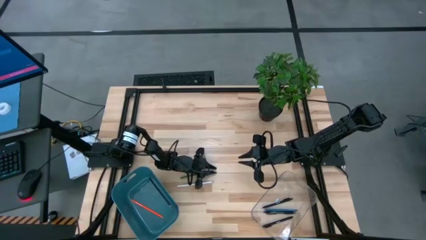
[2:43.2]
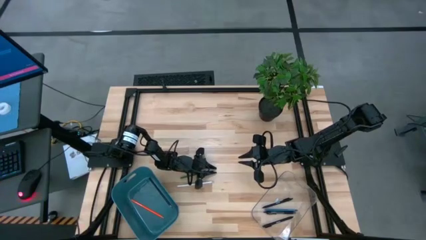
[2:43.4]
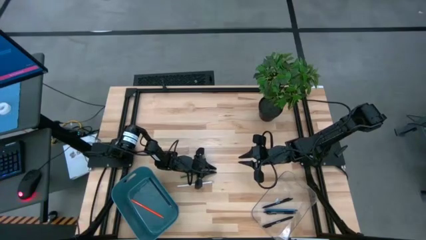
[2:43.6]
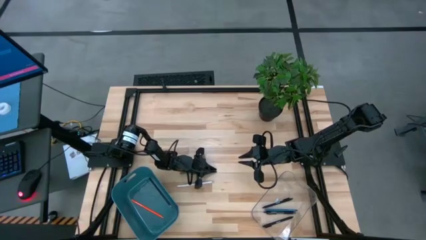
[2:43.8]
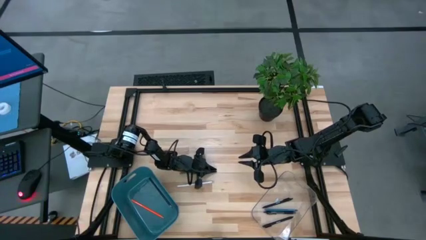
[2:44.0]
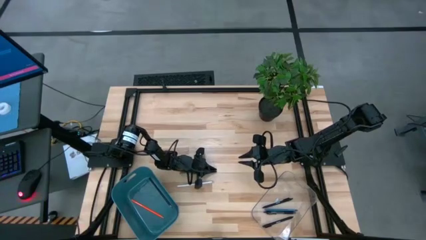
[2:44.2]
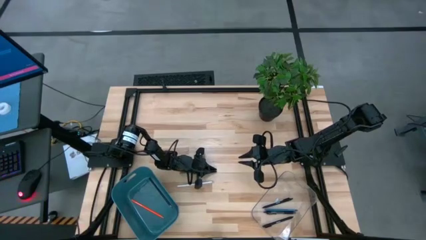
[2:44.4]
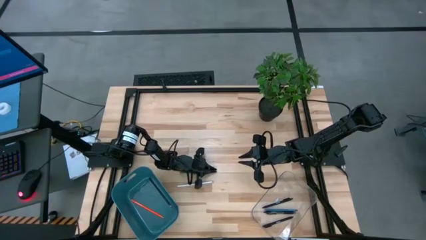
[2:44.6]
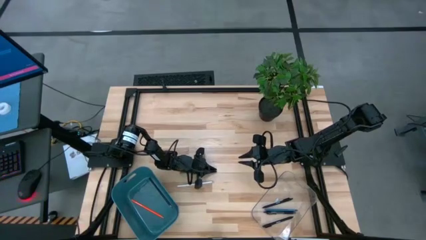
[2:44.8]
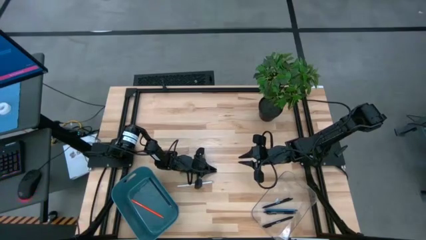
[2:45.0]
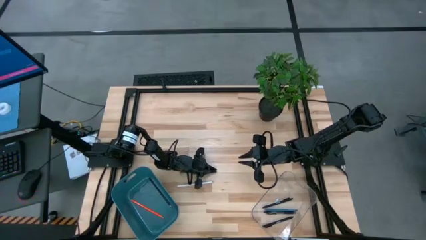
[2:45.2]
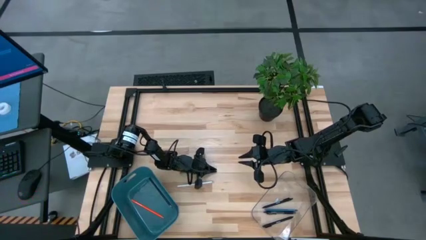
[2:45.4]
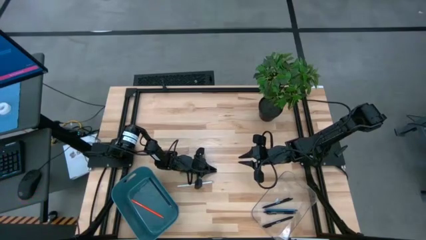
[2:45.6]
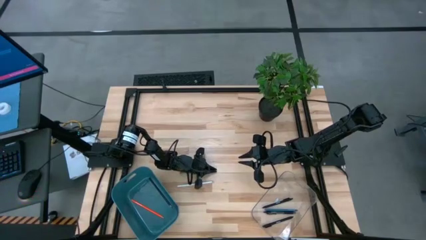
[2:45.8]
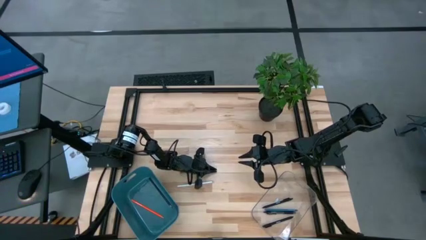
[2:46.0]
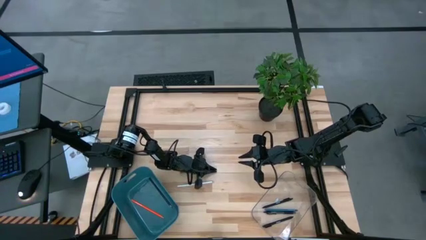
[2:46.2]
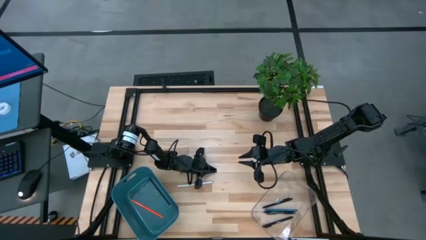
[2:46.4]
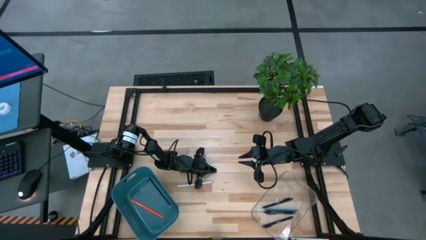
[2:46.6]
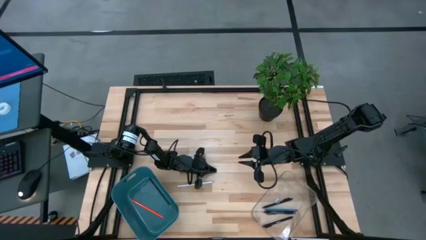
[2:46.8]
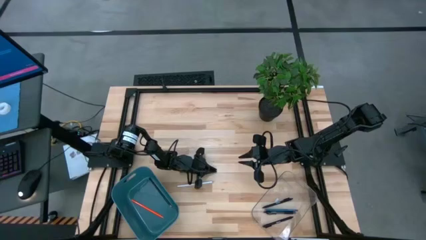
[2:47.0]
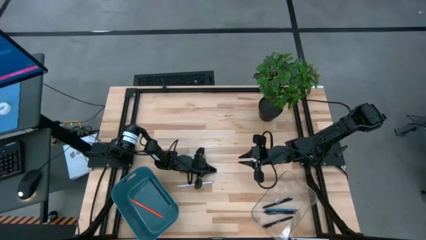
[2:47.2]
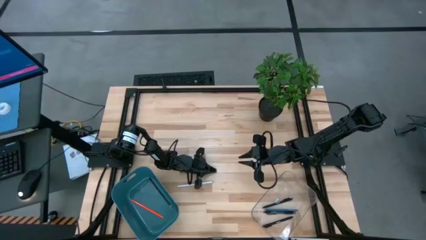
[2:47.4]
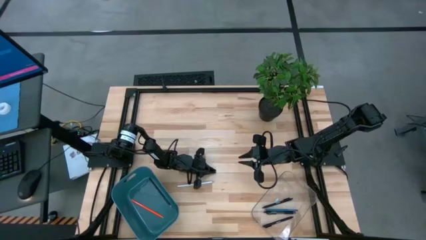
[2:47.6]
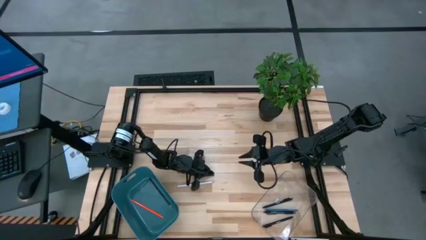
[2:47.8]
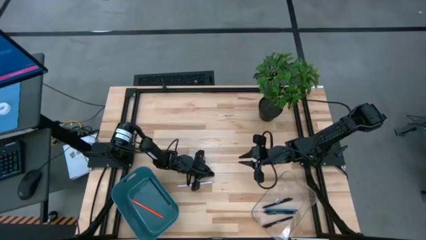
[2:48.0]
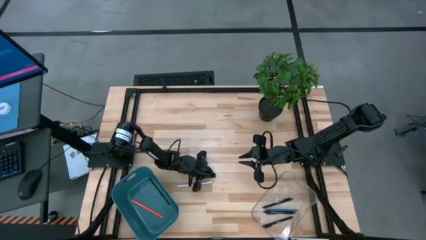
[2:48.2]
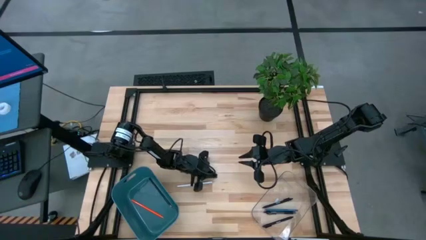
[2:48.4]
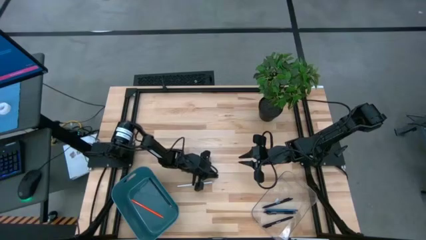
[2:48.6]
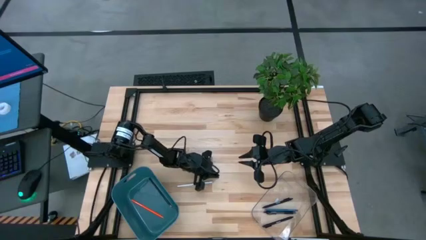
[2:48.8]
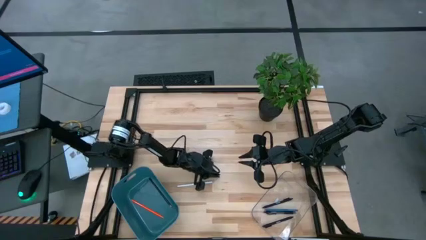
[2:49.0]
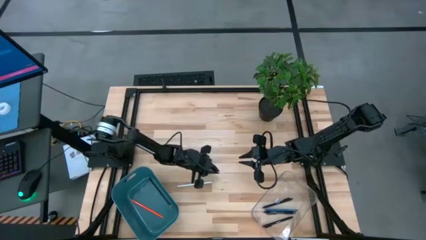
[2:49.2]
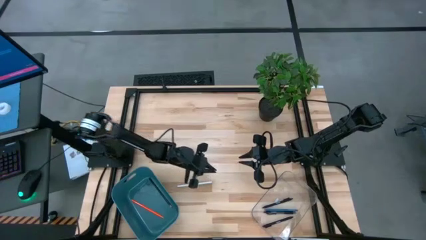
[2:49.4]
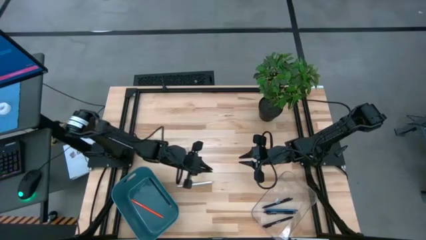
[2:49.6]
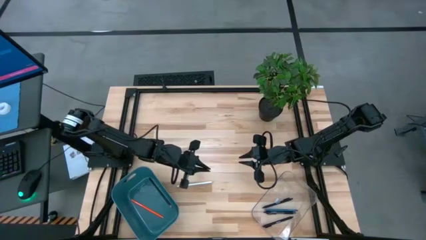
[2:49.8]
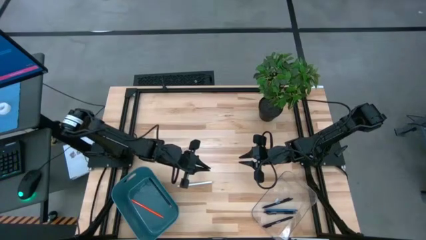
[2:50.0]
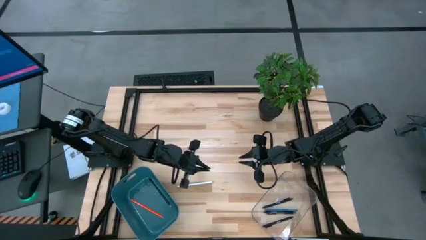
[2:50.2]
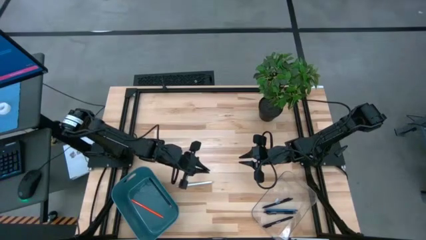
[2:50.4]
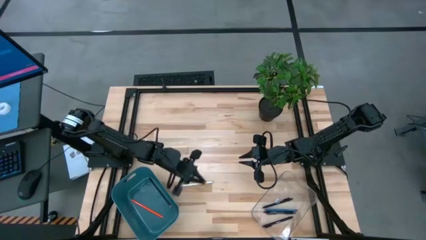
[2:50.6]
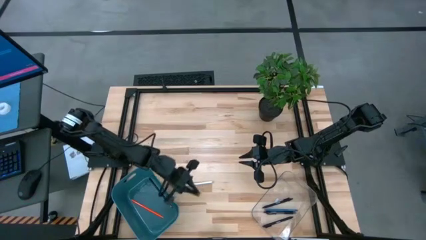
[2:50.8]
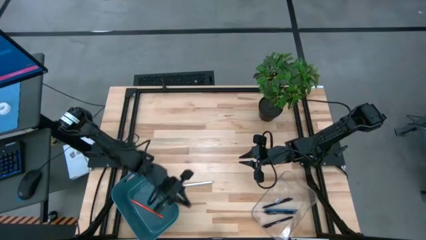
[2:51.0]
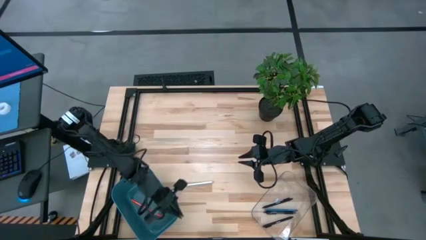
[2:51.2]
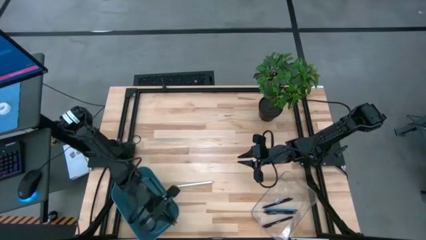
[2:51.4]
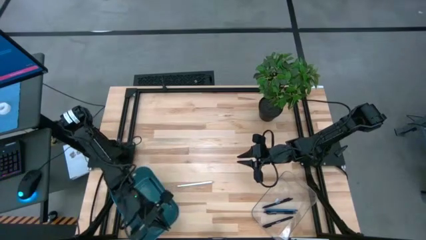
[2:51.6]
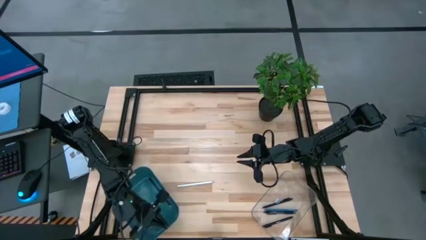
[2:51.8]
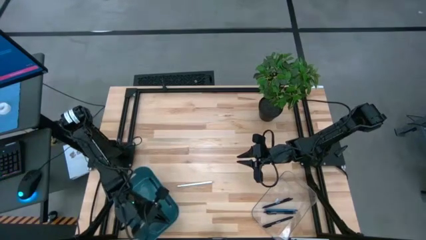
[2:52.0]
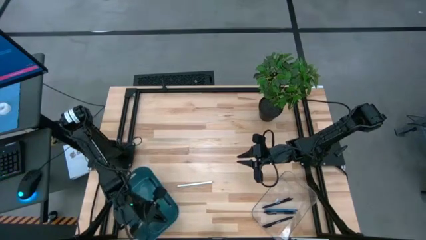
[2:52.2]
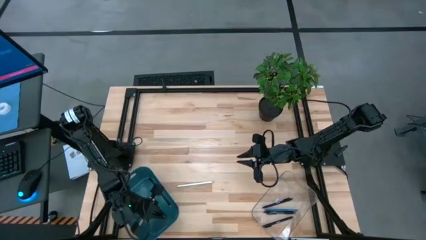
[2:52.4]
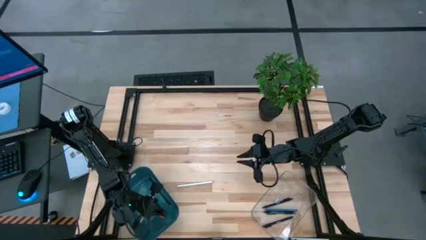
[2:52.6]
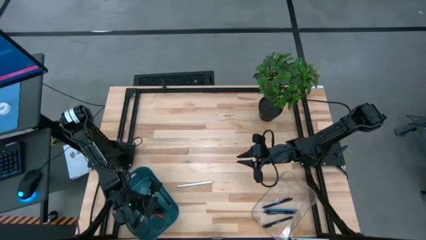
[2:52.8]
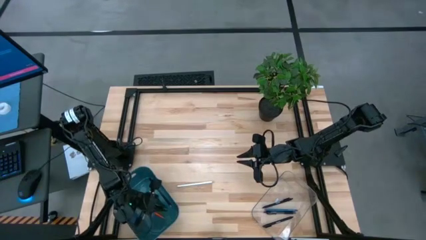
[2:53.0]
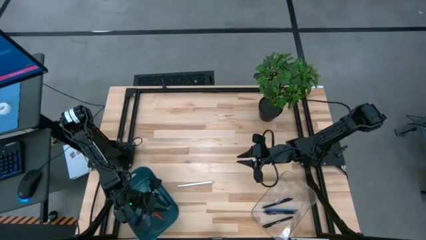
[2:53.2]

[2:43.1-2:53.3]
Task: Sort pens & pencils
Put the green pencil in the blue bin
